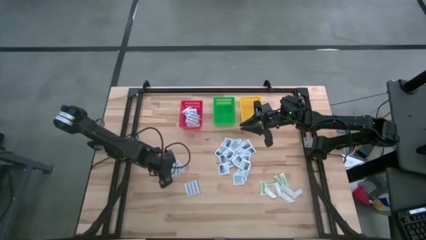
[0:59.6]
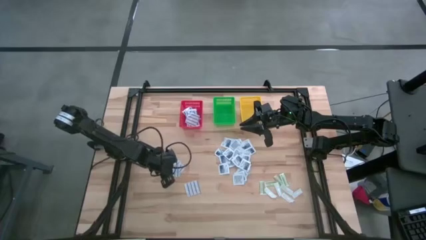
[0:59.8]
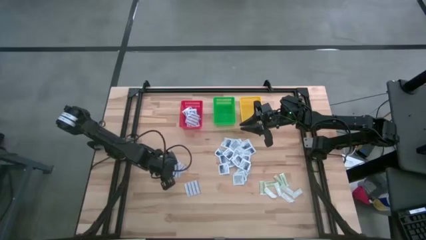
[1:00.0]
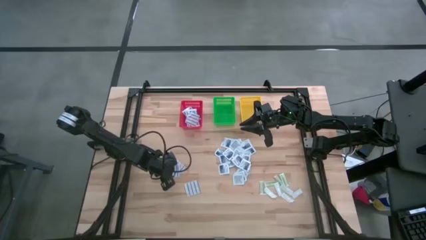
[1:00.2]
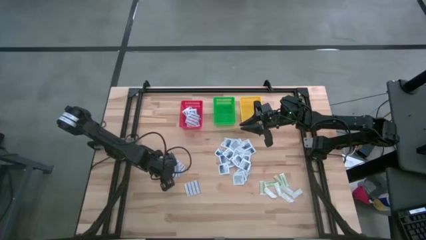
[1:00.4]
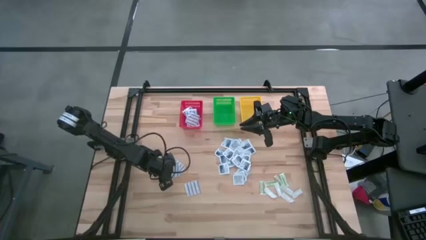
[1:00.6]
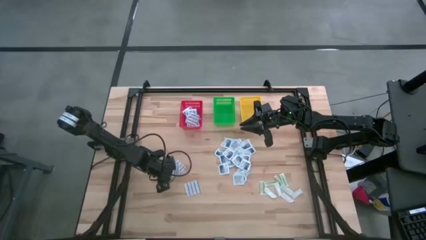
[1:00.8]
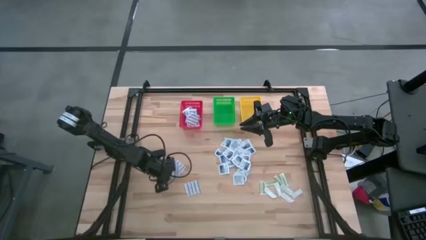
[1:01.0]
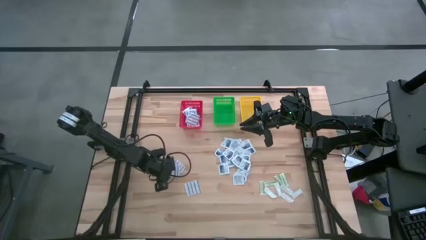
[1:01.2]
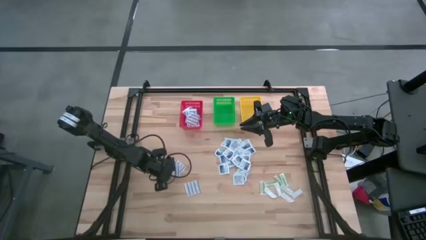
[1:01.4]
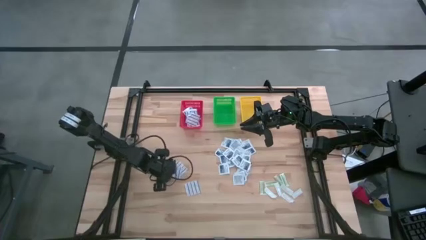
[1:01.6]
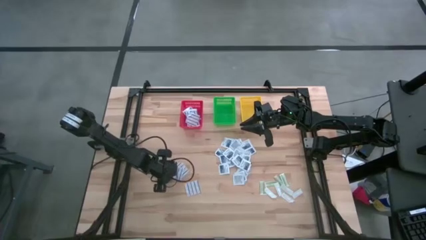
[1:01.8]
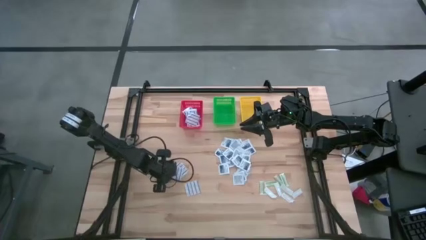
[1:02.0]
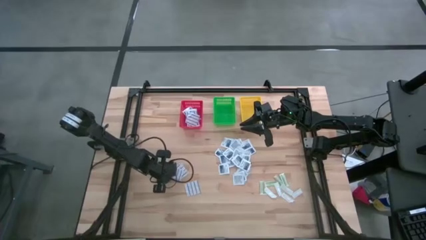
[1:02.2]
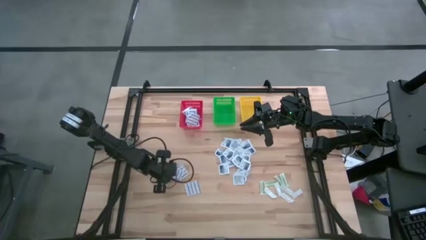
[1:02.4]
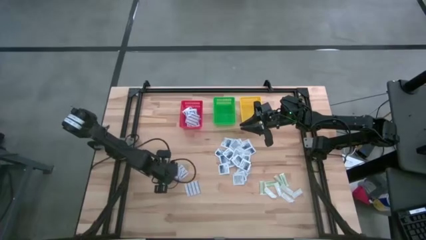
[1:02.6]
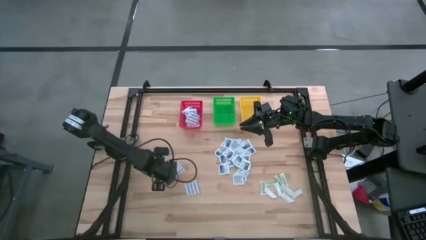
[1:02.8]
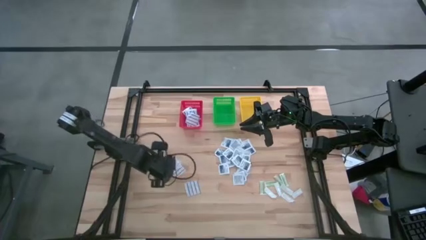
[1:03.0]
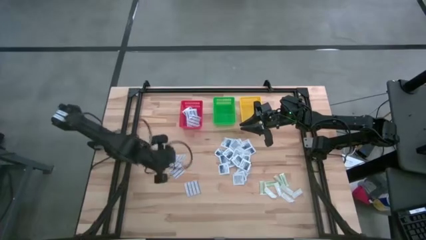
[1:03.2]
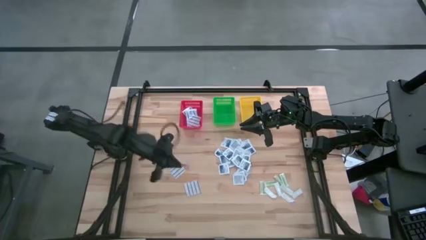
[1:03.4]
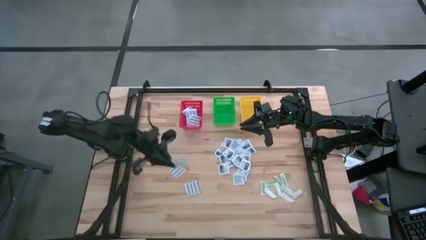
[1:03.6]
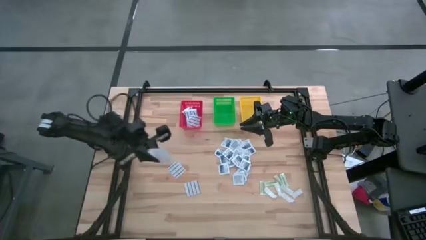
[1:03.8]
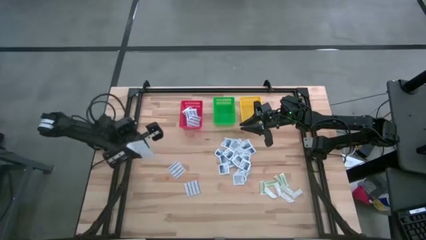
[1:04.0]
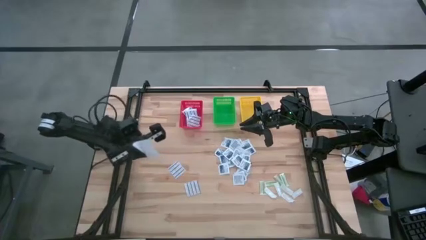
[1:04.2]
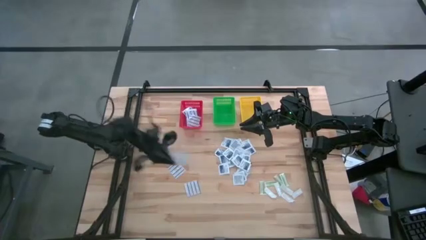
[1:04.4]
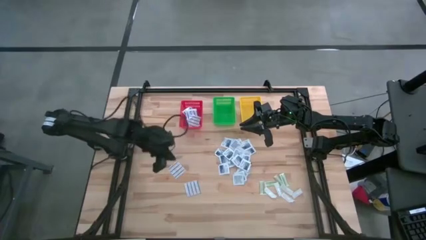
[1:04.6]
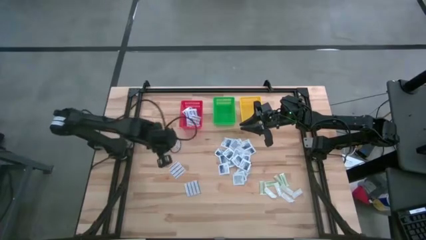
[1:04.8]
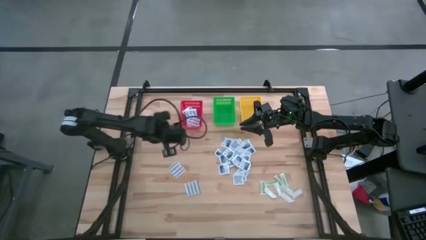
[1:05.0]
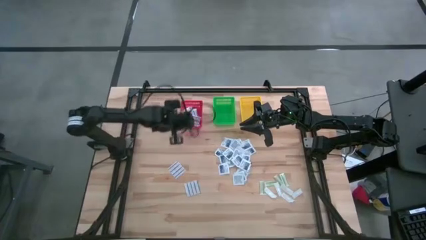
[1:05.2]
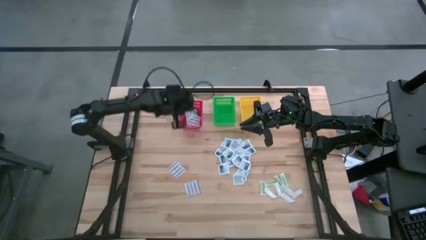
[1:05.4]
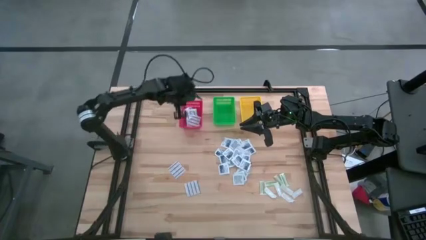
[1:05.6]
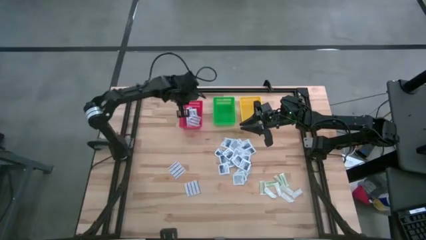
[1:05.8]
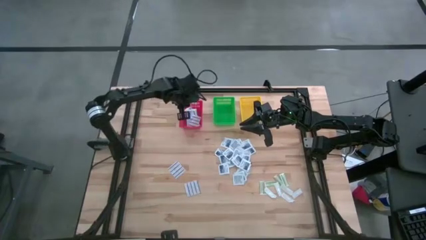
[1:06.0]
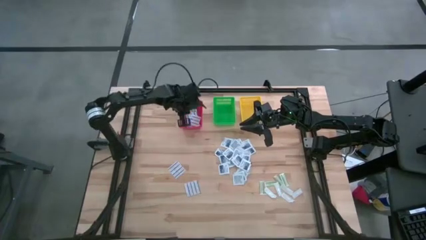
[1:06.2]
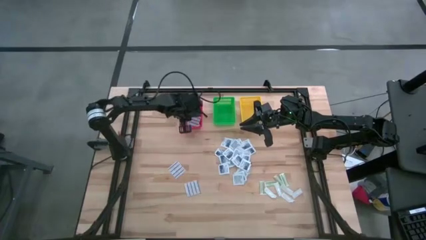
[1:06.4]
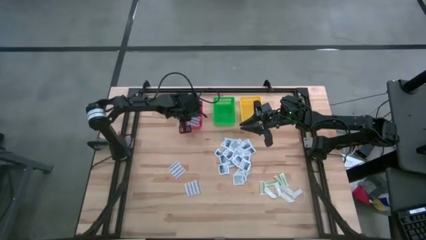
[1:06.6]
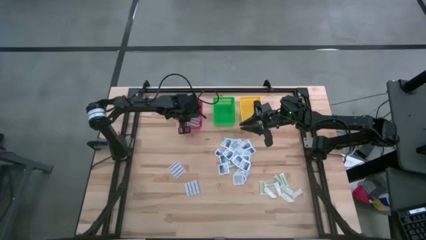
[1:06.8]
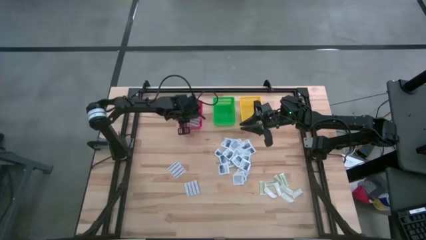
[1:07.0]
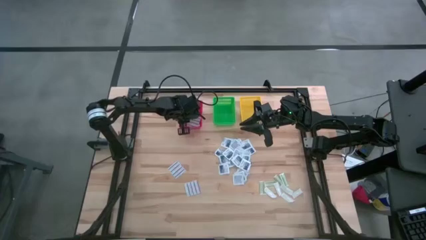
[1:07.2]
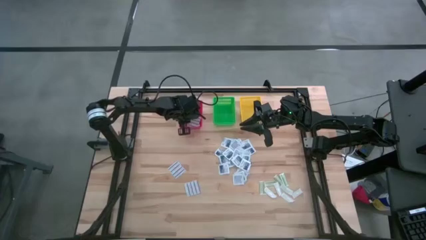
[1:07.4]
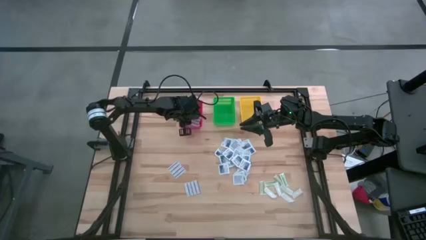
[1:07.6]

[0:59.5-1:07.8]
Task: Pick & Place First Aid Supplies
Put the blue bandage into the red basket

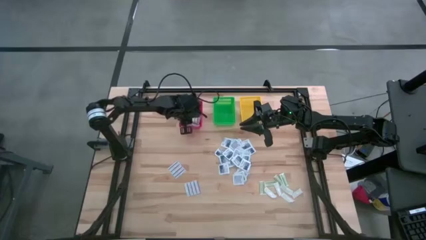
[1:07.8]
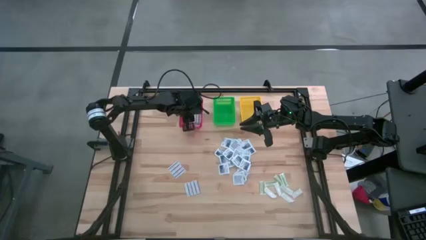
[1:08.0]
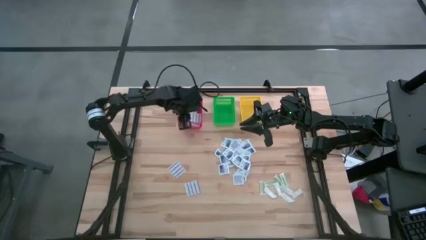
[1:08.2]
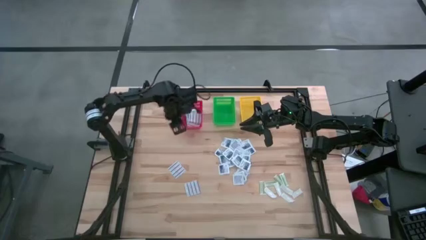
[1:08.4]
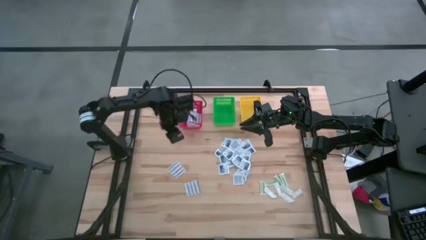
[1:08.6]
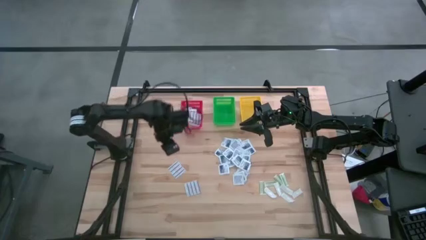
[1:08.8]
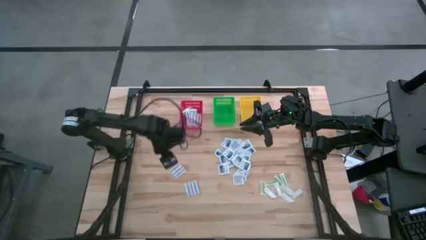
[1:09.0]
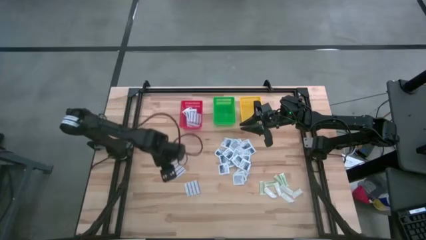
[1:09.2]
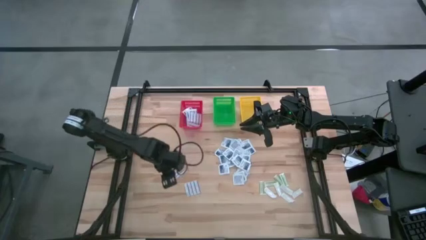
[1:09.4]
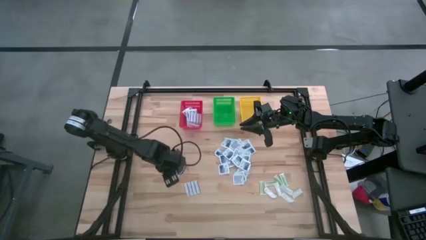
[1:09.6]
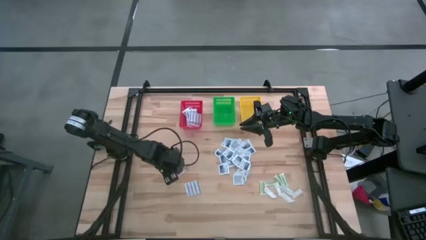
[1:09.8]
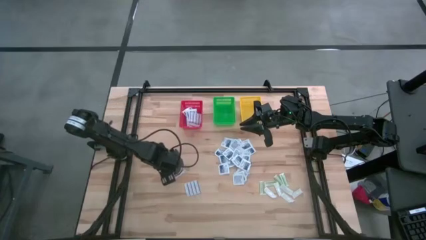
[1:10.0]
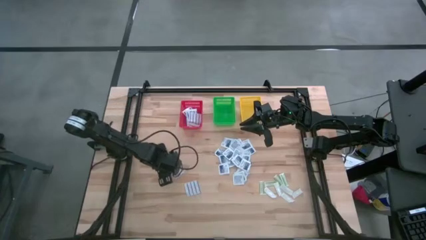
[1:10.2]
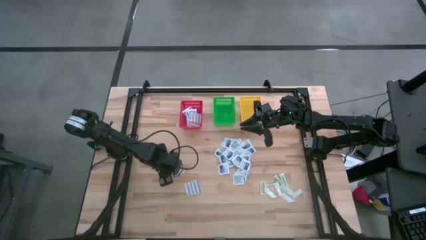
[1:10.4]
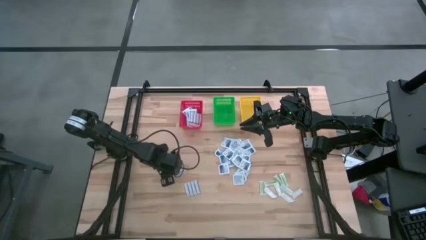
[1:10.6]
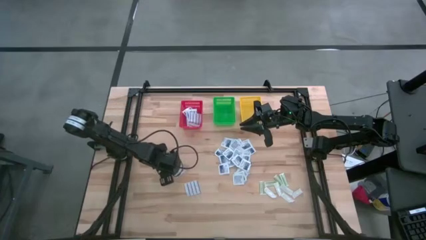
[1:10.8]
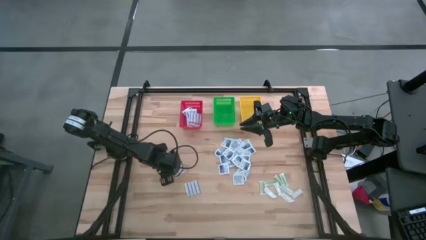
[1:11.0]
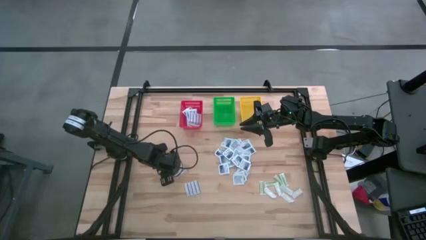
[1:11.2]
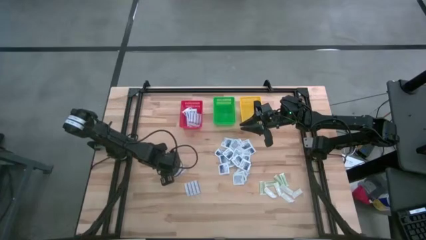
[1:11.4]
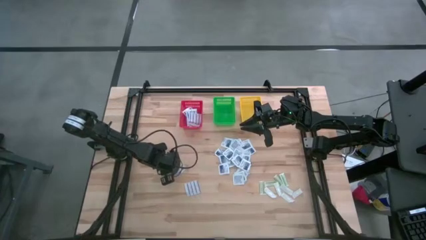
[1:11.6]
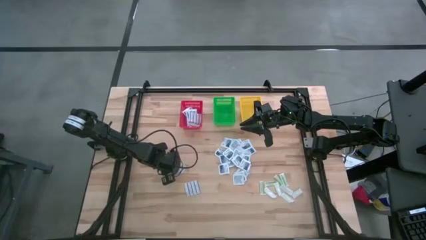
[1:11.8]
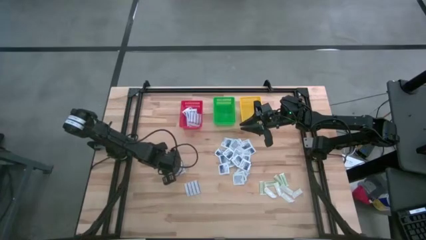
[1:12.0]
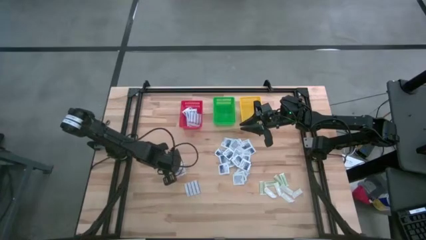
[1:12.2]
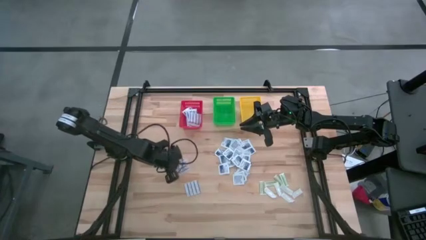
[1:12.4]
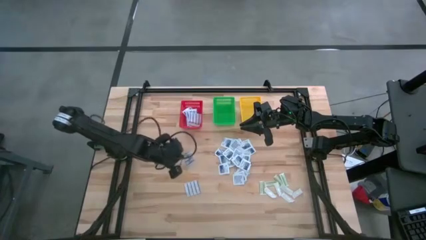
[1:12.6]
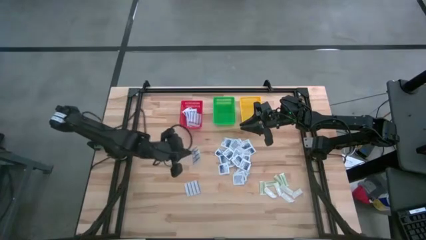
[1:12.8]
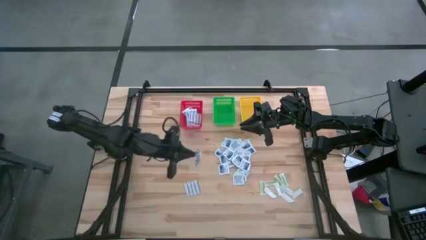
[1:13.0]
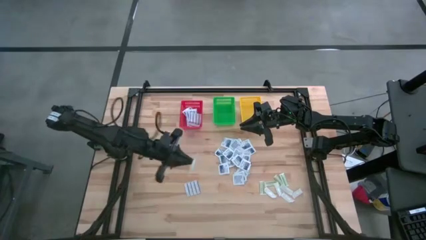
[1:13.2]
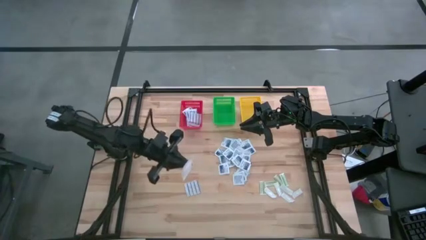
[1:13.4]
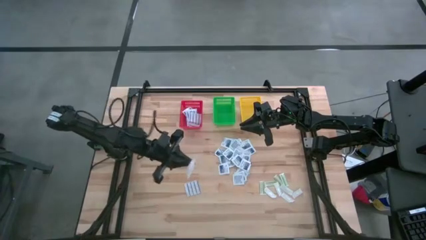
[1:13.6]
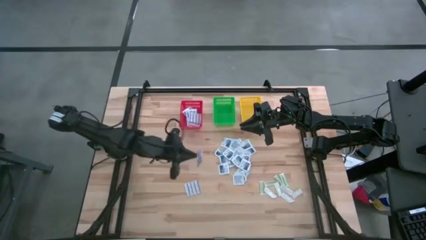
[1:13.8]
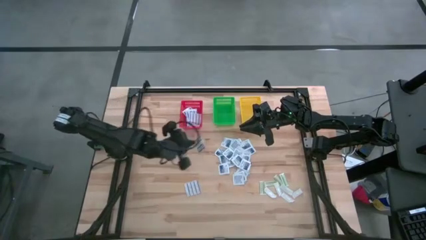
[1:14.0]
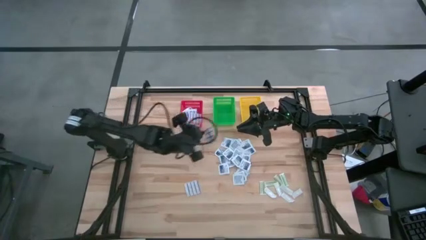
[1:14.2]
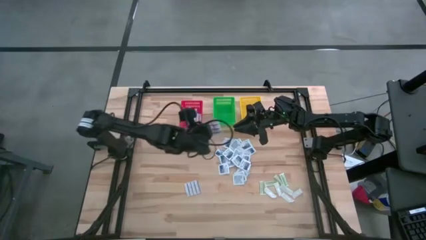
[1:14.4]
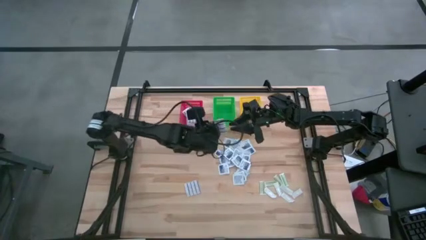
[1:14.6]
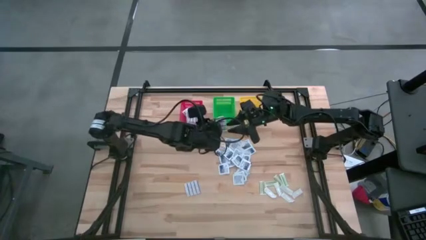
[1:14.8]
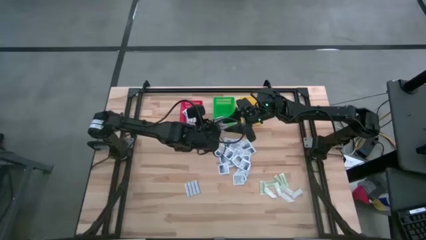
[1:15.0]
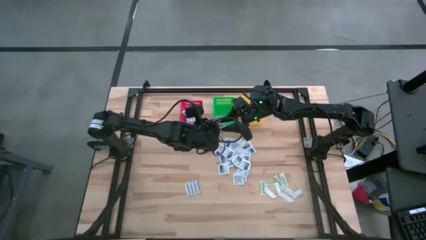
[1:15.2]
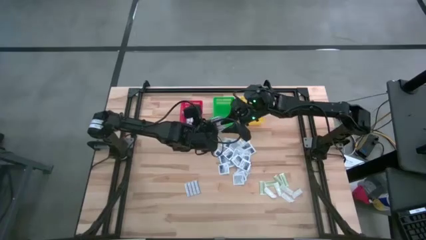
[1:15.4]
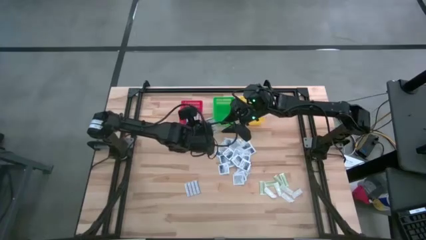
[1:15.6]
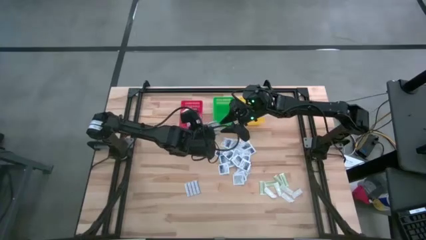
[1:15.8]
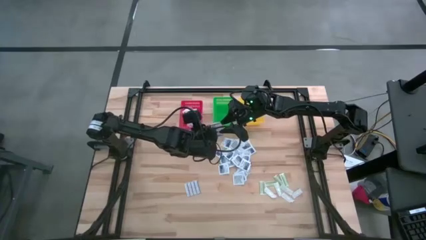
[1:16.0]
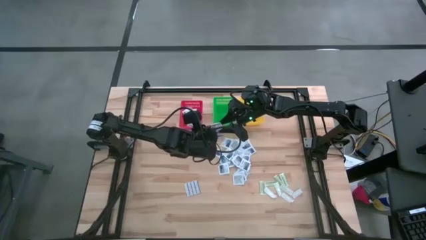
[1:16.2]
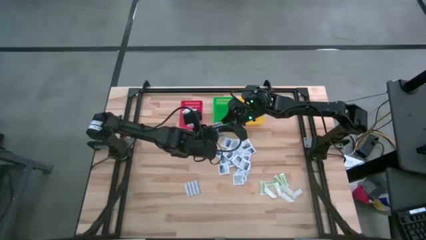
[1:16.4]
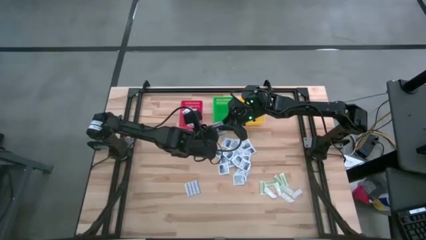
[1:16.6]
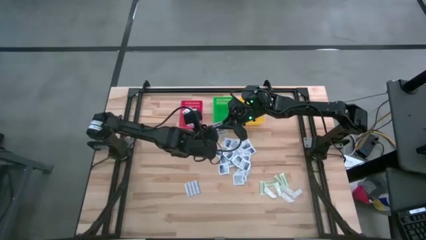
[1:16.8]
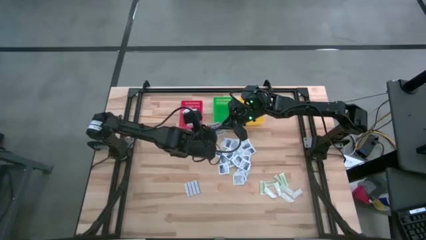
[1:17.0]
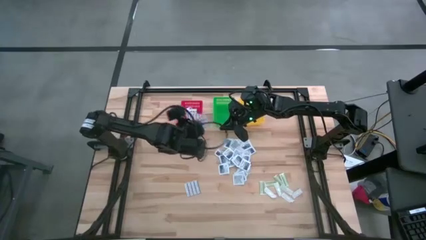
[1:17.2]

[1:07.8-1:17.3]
Put the blue bandage into the red basket
